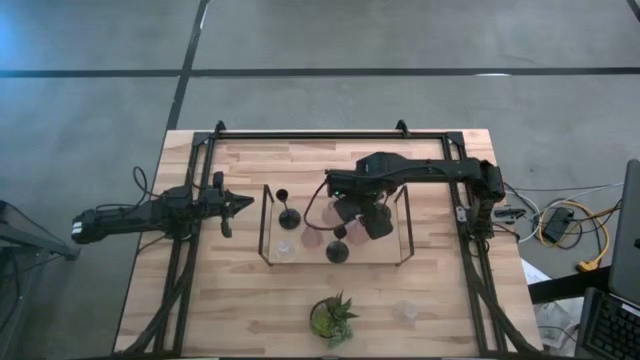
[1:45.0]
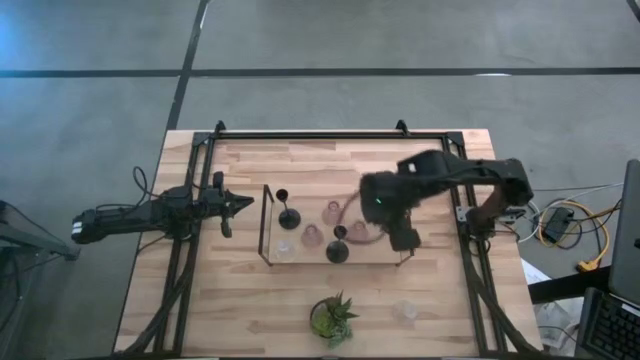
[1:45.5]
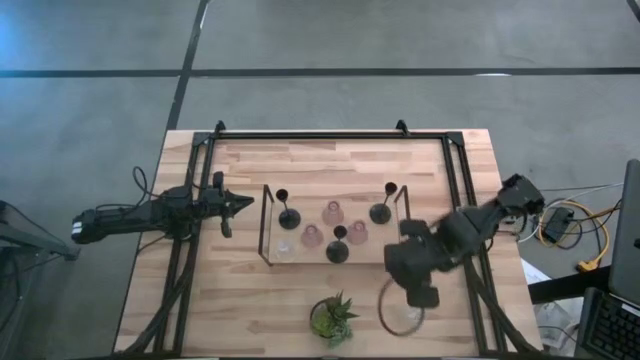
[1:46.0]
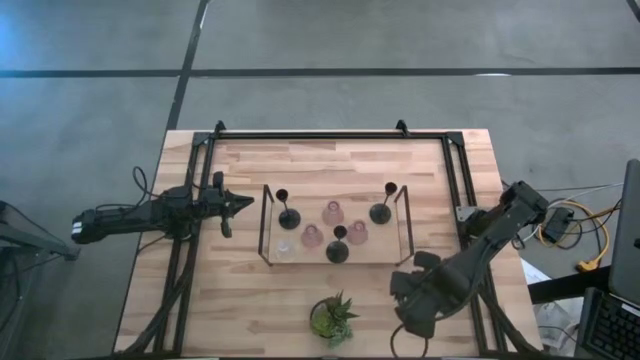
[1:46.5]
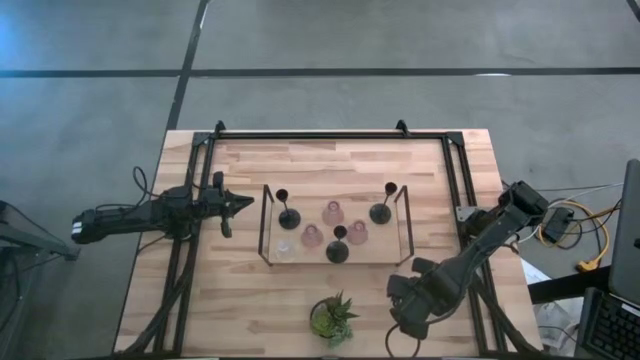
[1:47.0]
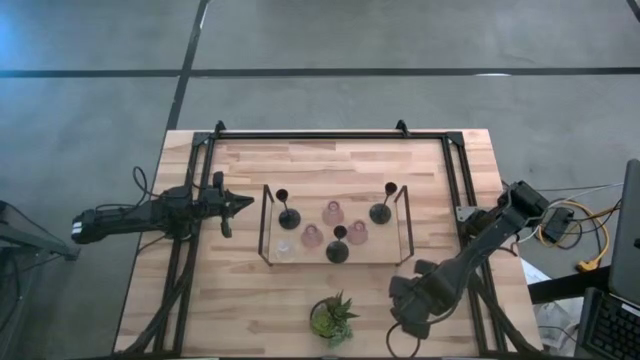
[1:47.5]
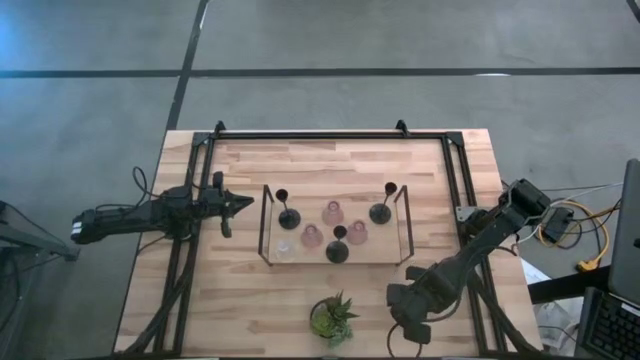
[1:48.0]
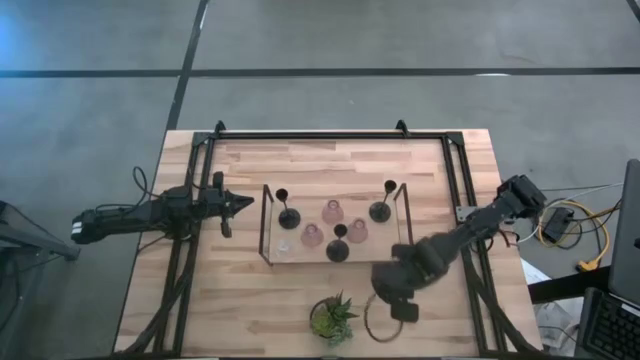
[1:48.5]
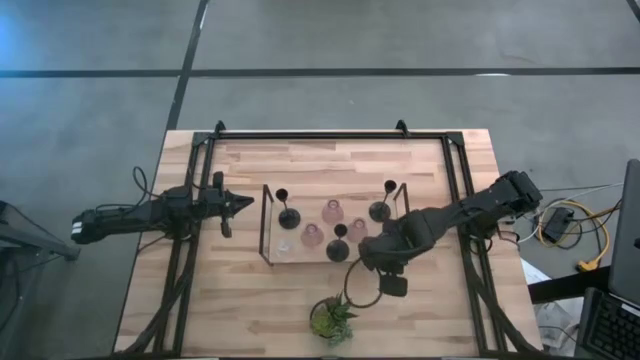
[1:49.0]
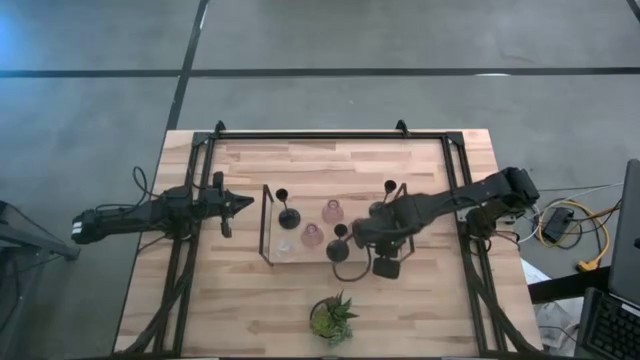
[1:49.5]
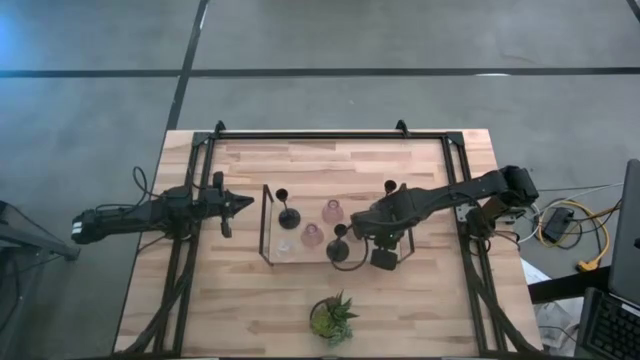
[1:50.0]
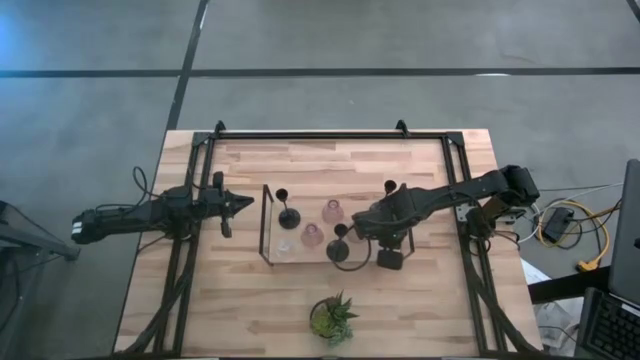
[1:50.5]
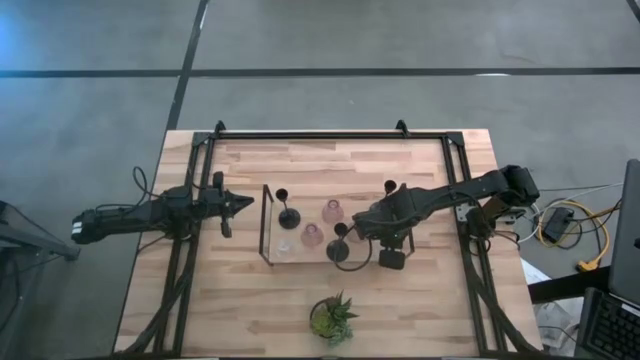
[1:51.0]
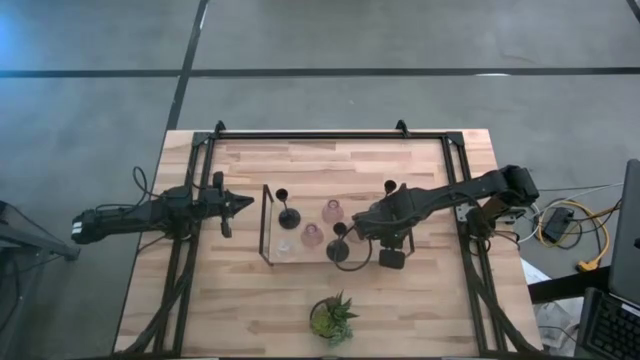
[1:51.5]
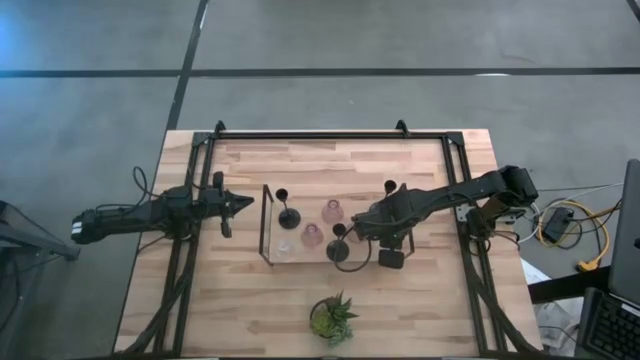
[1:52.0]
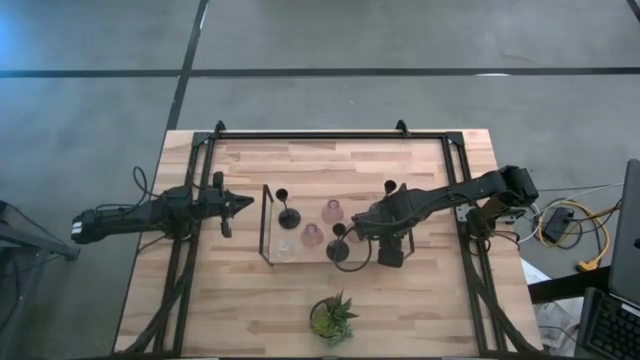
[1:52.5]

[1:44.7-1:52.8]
Task: Pick & Place candle stick holders
Put the transparent glass candle holder on the shelf

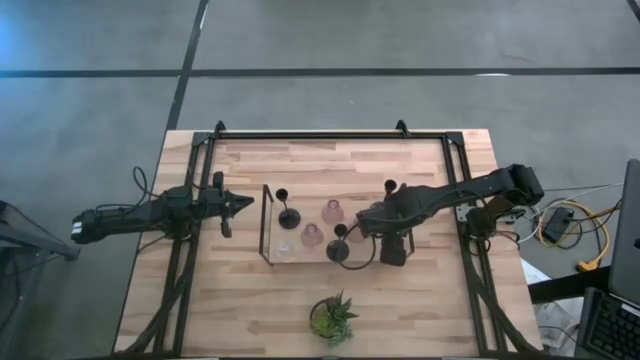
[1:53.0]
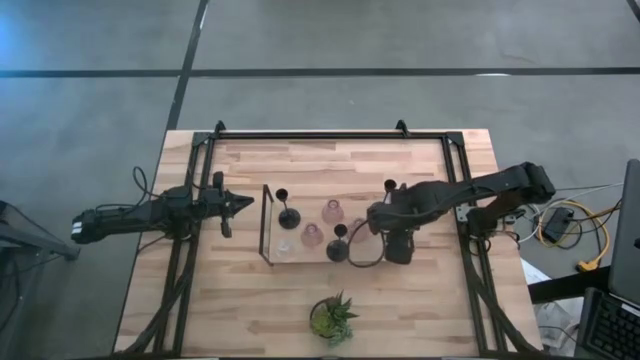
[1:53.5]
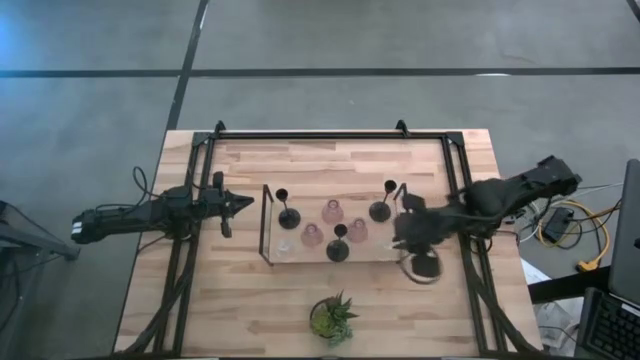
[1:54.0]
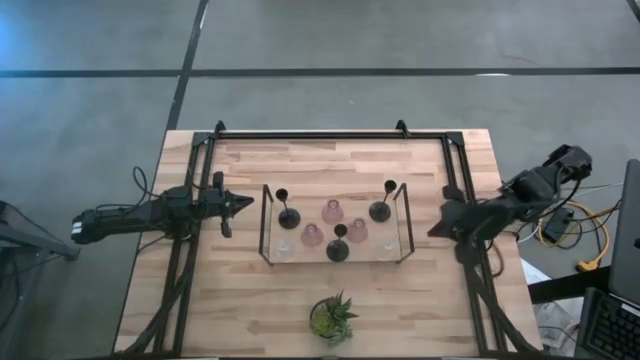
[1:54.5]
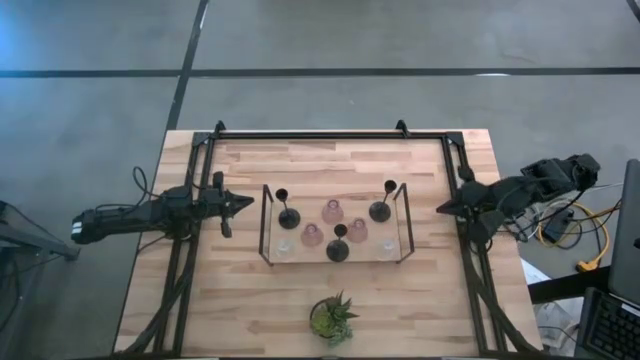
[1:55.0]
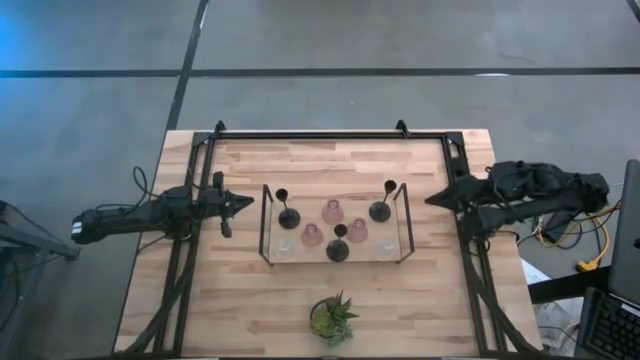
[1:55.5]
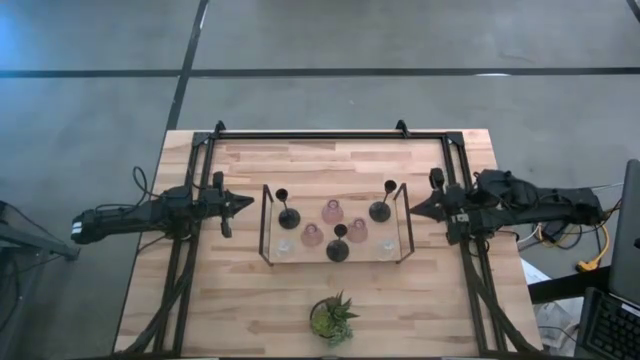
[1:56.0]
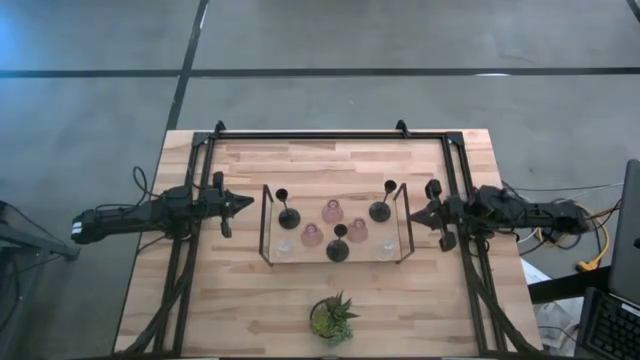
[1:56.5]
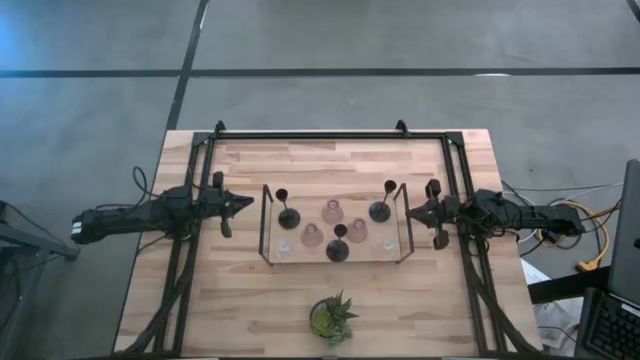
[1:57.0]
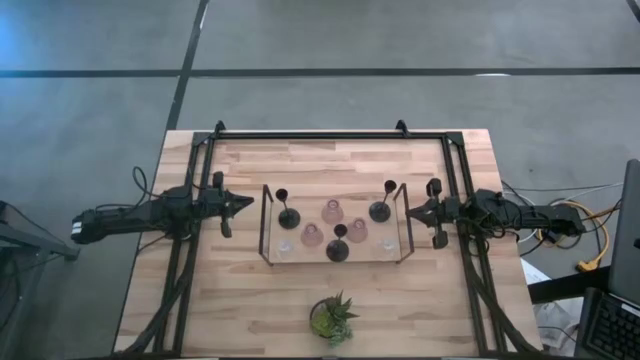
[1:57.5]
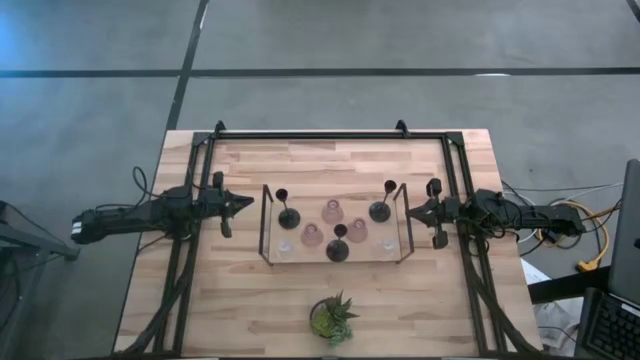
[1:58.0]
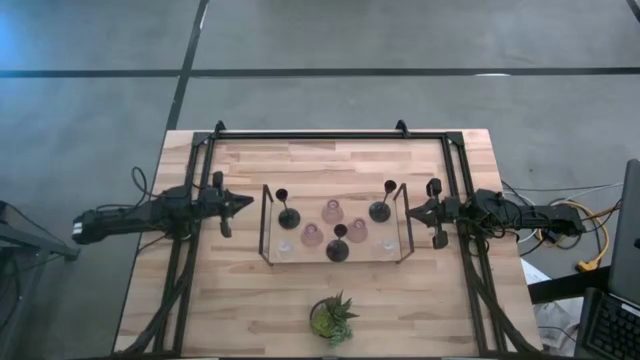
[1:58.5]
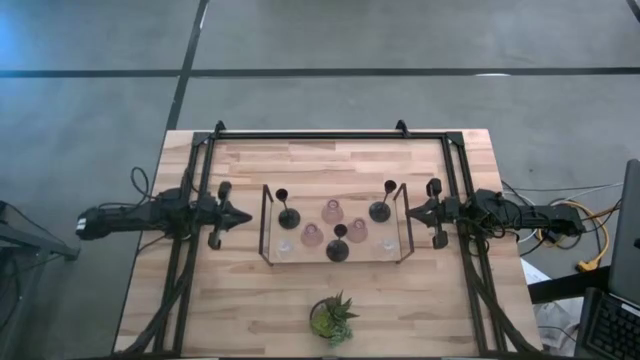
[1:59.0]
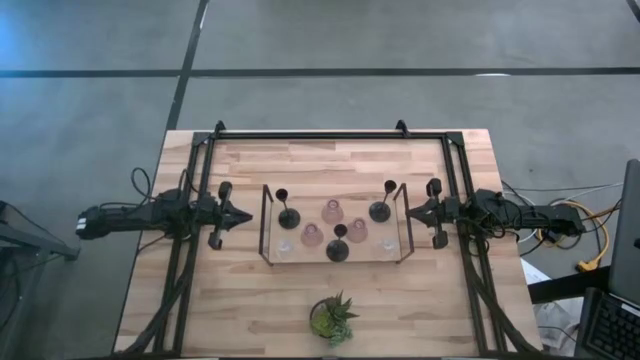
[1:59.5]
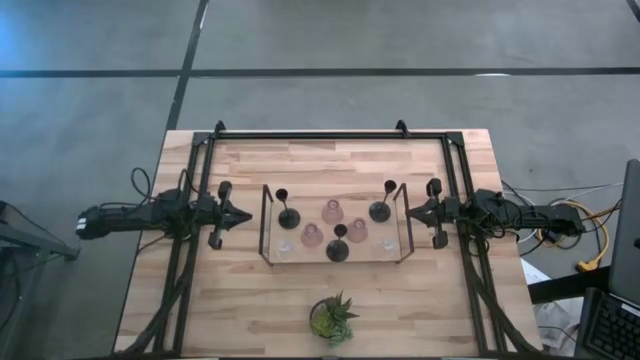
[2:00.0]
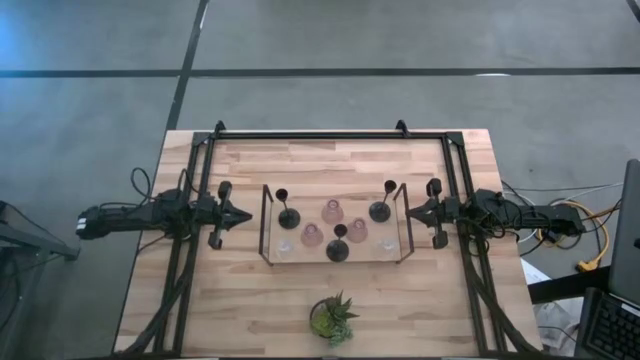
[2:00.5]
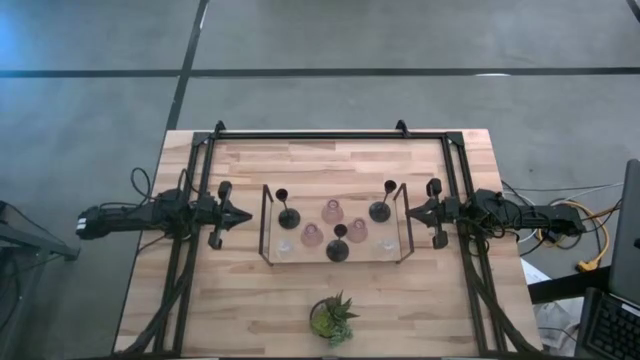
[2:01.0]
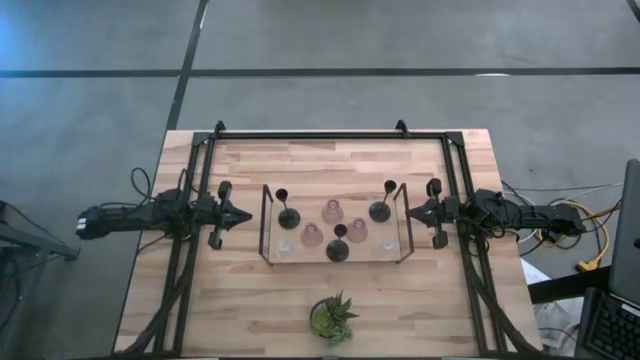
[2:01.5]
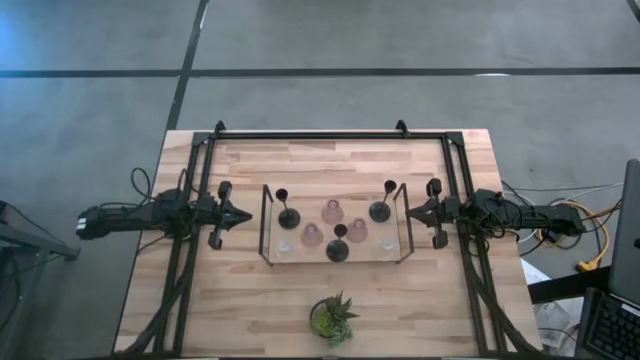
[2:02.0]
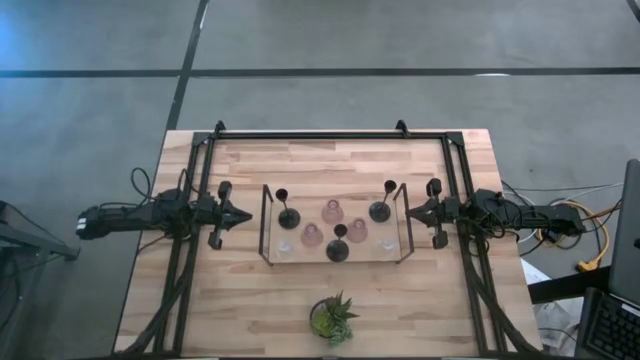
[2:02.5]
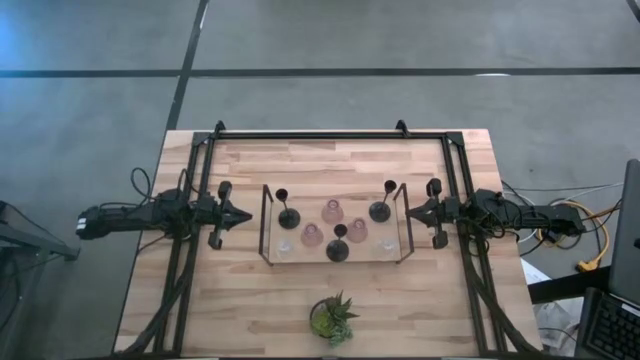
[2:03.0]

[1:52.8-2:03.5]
Return to Home Position

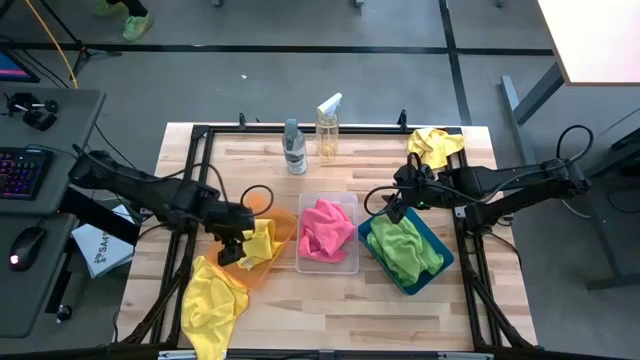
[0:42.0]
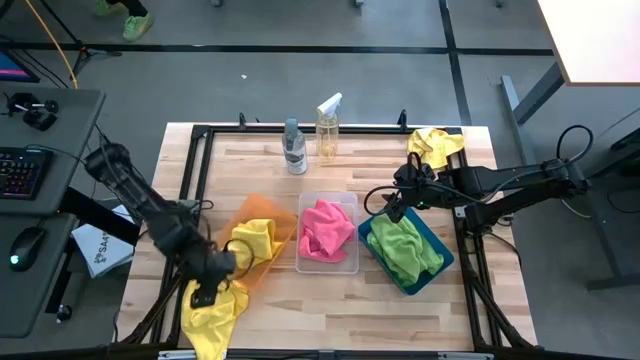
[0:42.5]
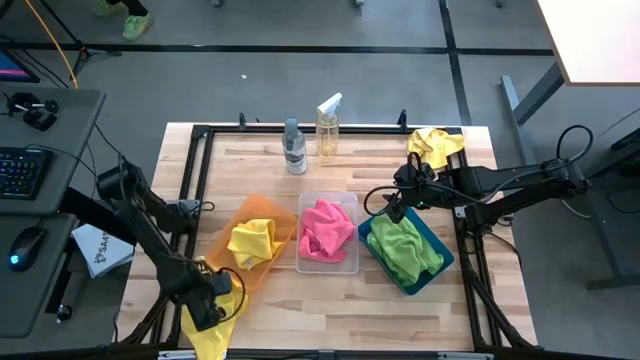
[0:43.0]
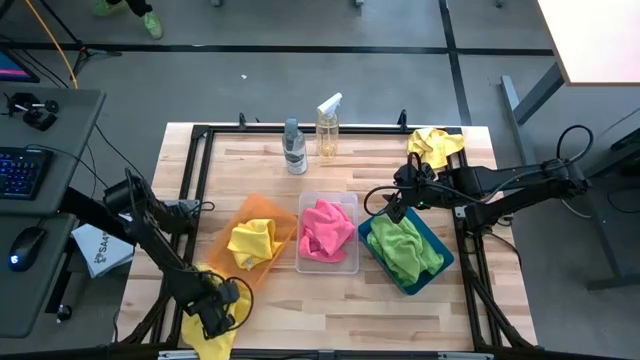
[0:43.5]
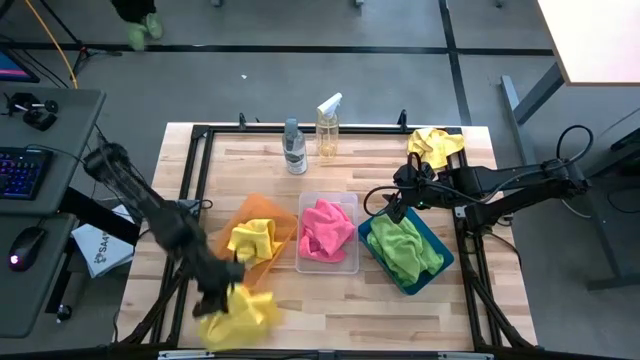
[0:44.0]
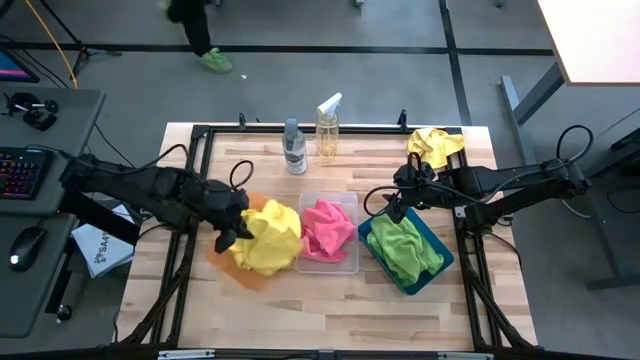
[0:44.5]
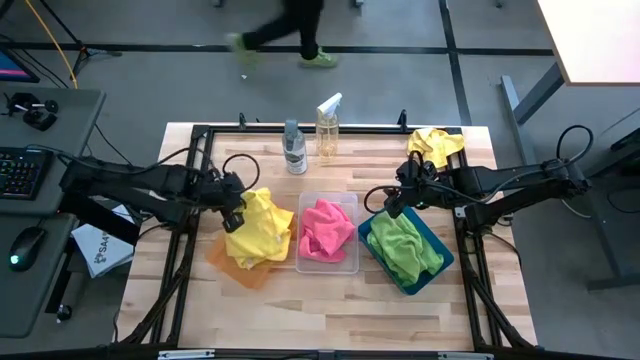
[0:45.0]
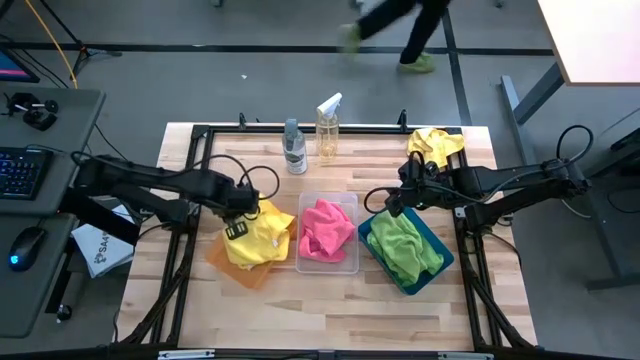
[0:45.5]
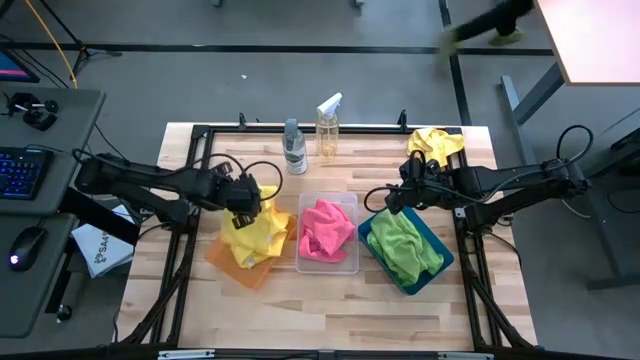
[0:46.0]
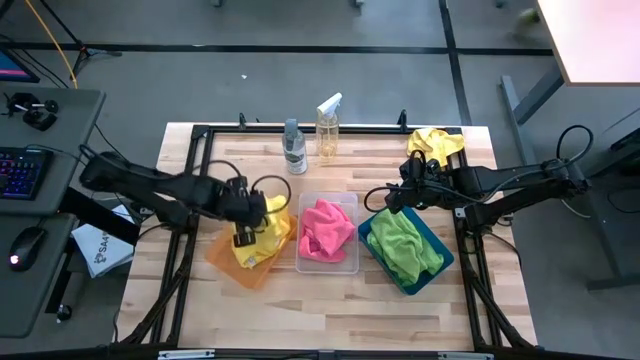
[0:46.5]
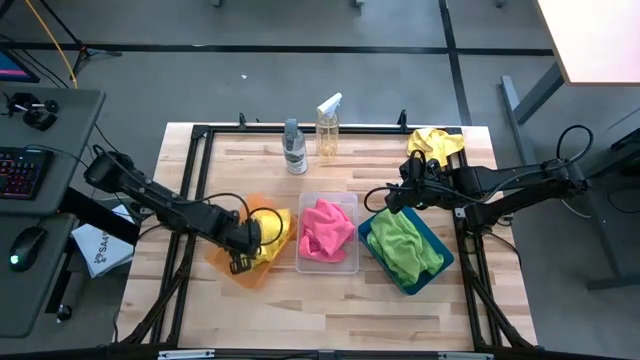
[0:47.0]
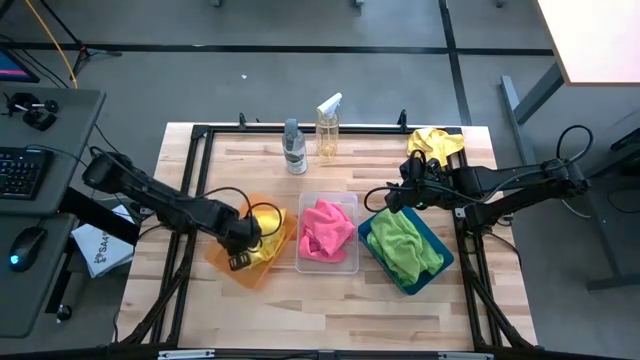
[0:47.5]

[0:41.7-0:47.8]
Task: Sort microfiber towel by color & place in baskets
Put the bottom yellow microfiber towel into the orange bin
